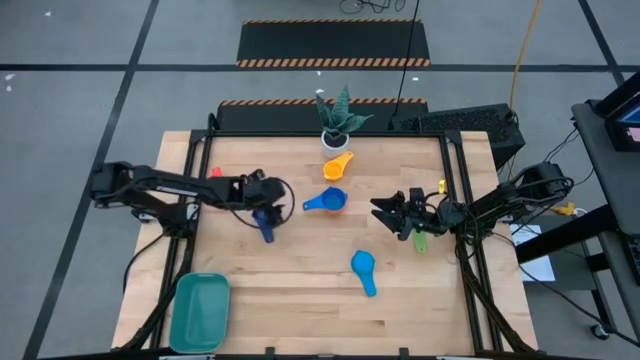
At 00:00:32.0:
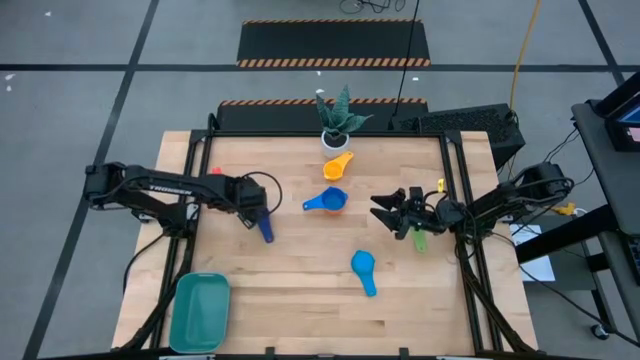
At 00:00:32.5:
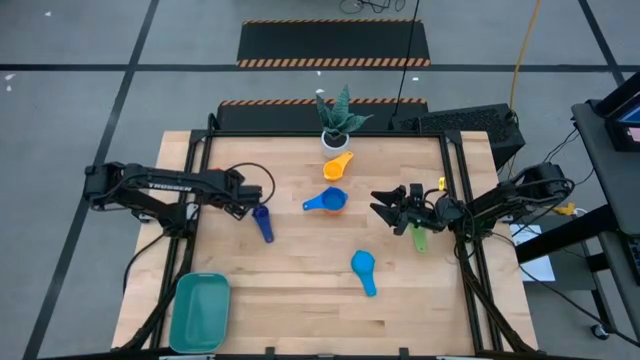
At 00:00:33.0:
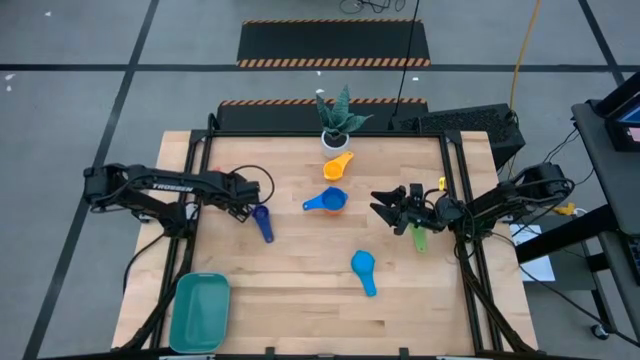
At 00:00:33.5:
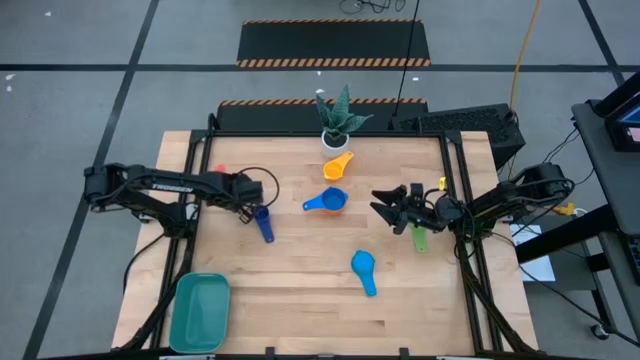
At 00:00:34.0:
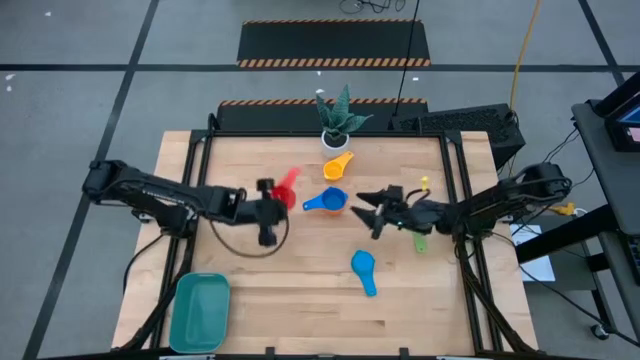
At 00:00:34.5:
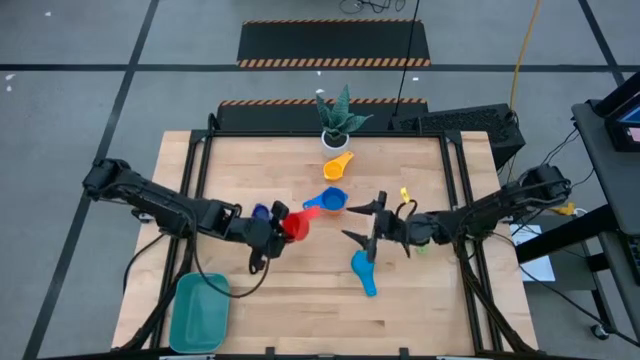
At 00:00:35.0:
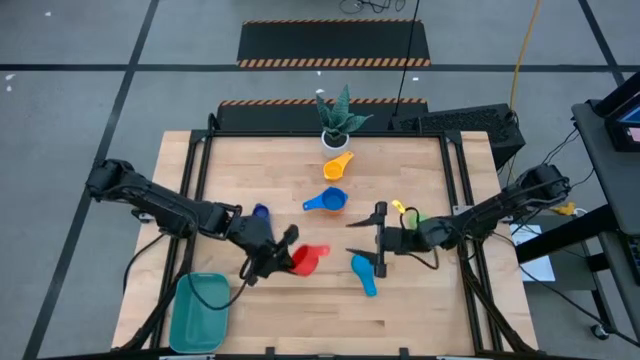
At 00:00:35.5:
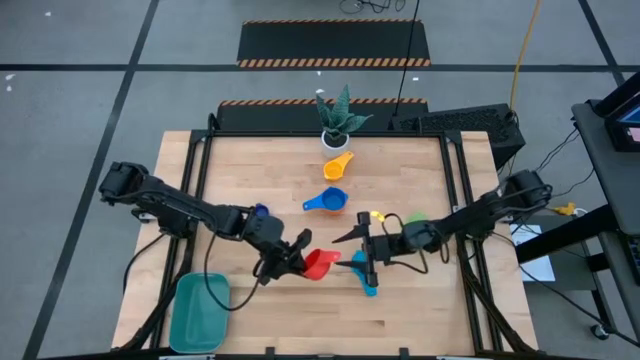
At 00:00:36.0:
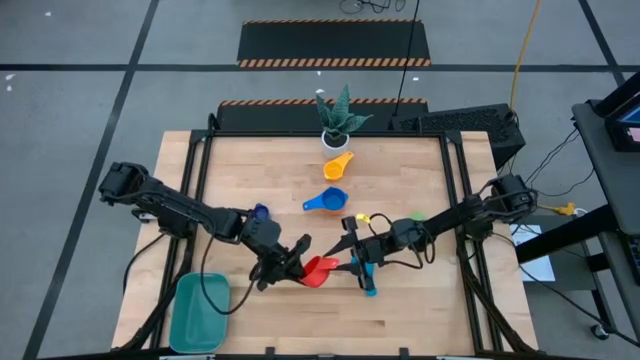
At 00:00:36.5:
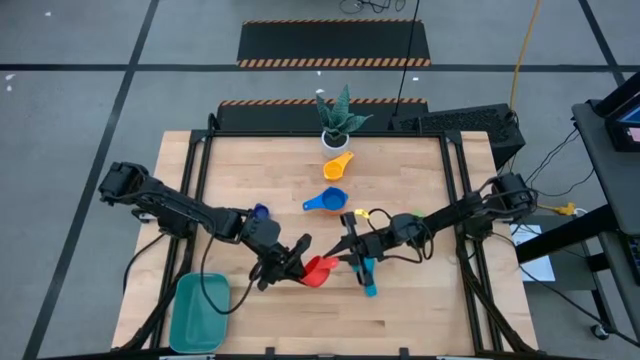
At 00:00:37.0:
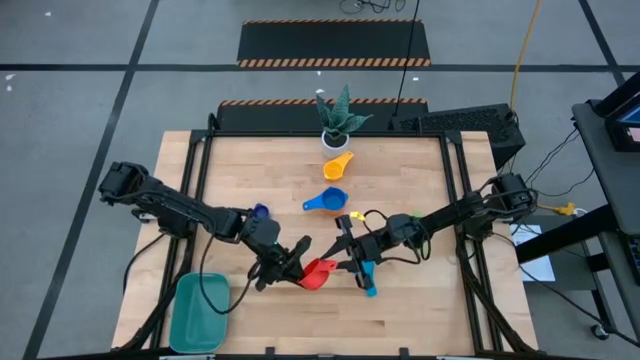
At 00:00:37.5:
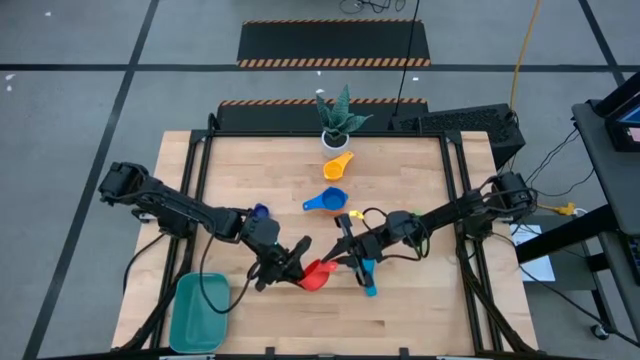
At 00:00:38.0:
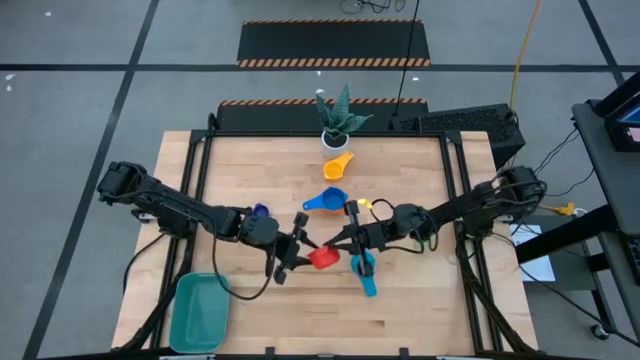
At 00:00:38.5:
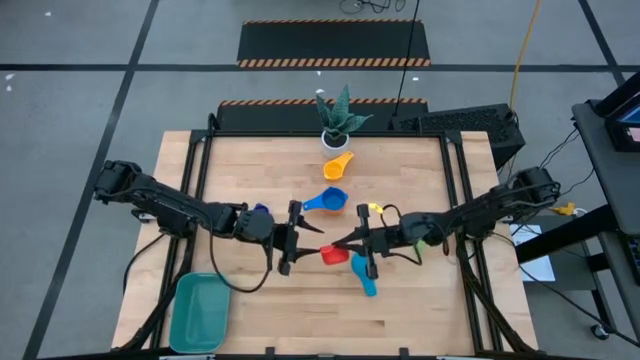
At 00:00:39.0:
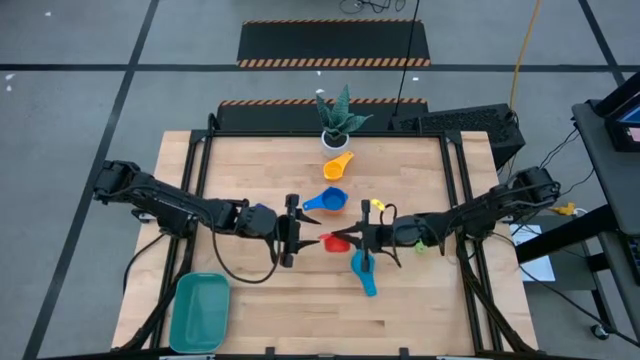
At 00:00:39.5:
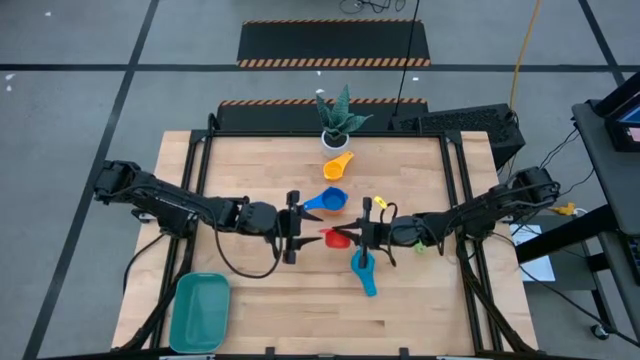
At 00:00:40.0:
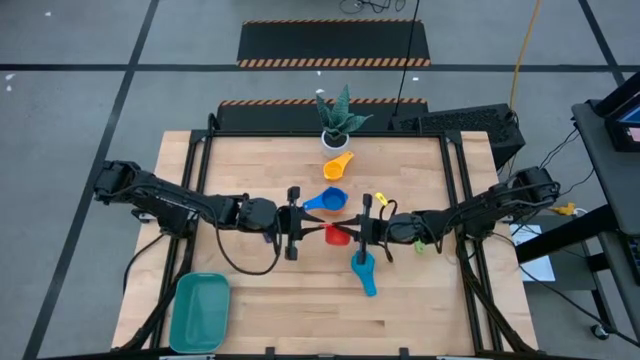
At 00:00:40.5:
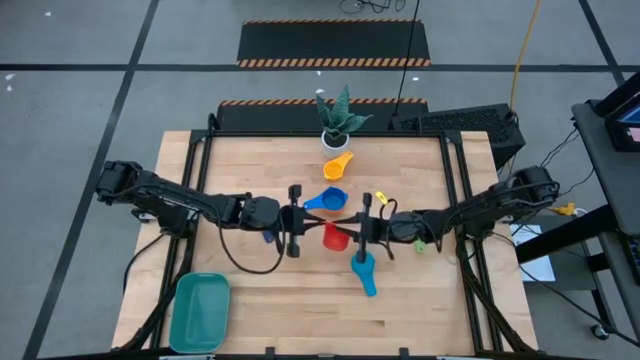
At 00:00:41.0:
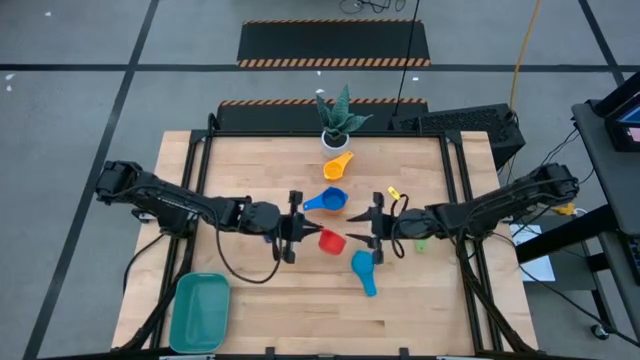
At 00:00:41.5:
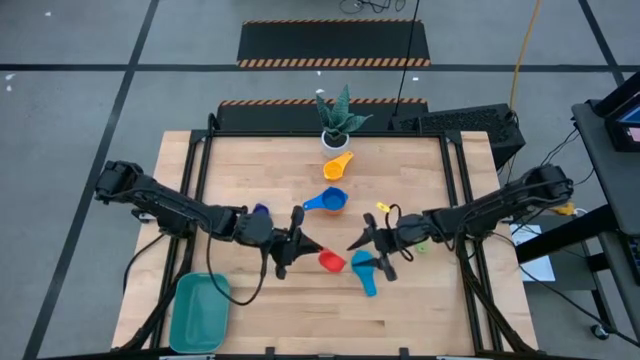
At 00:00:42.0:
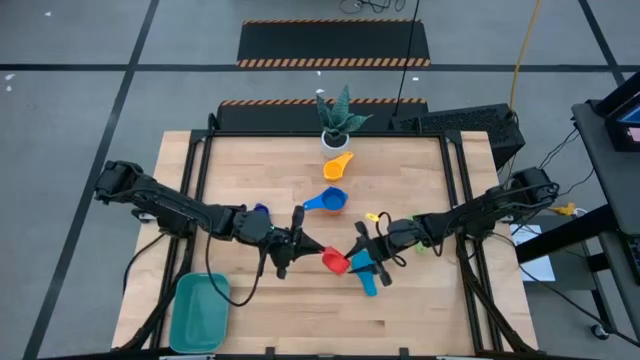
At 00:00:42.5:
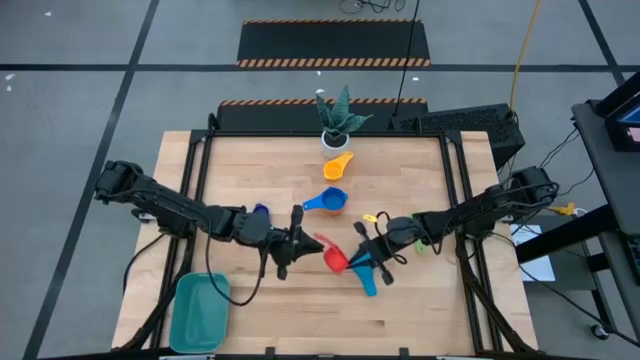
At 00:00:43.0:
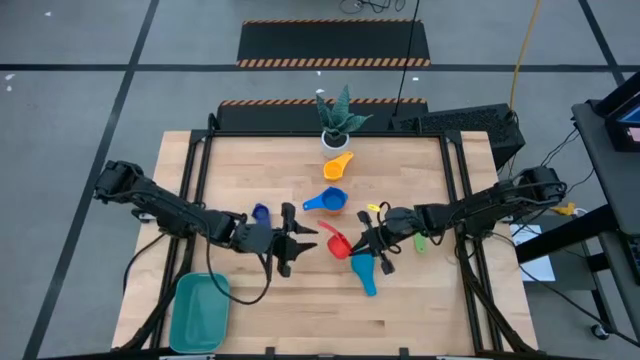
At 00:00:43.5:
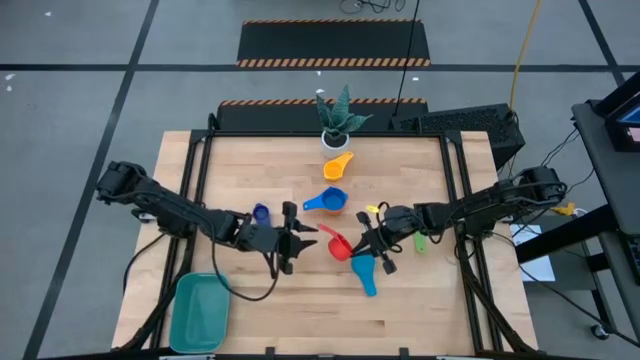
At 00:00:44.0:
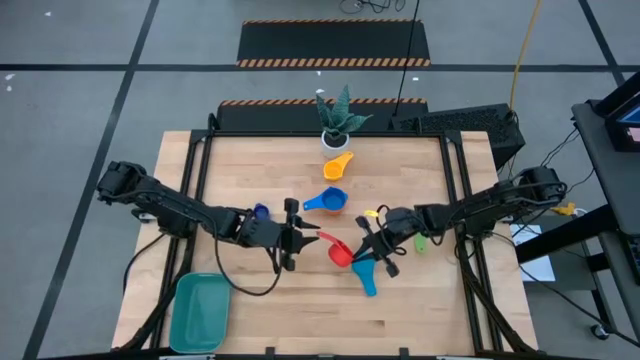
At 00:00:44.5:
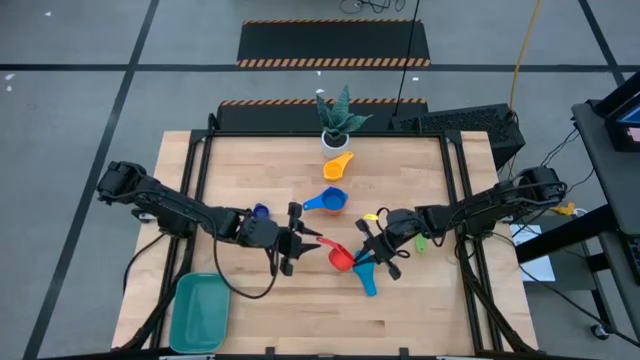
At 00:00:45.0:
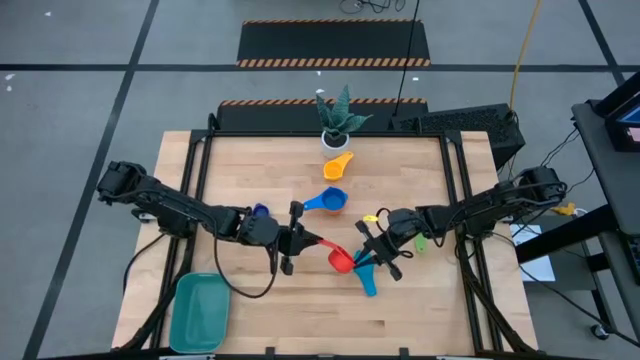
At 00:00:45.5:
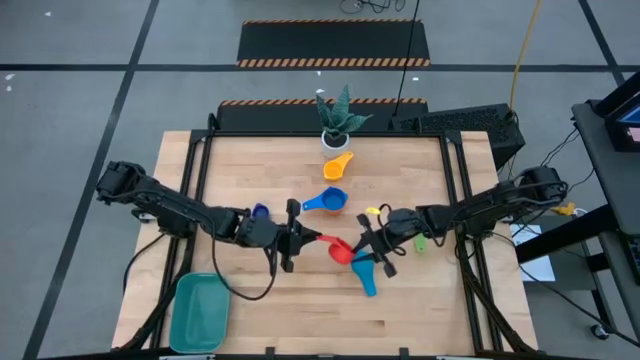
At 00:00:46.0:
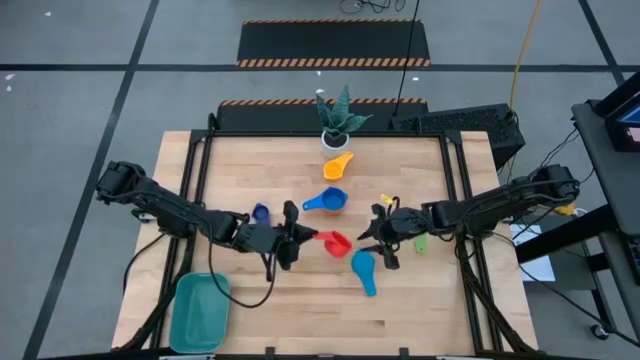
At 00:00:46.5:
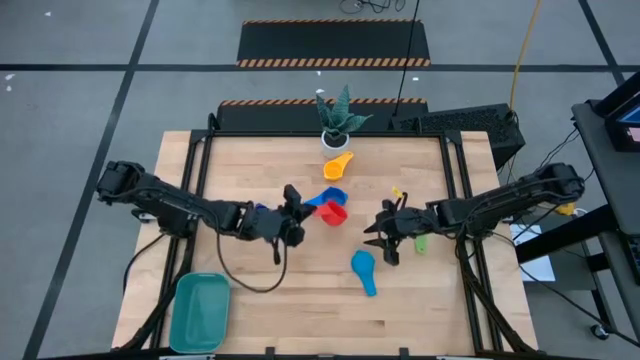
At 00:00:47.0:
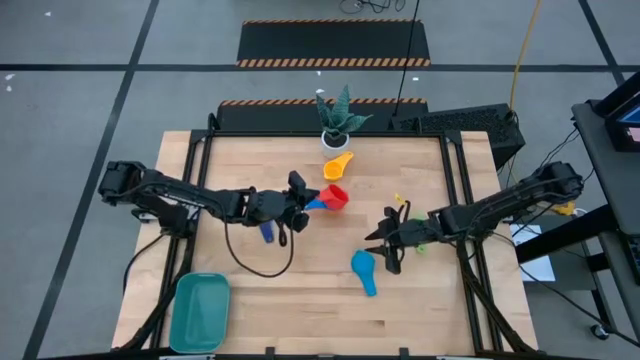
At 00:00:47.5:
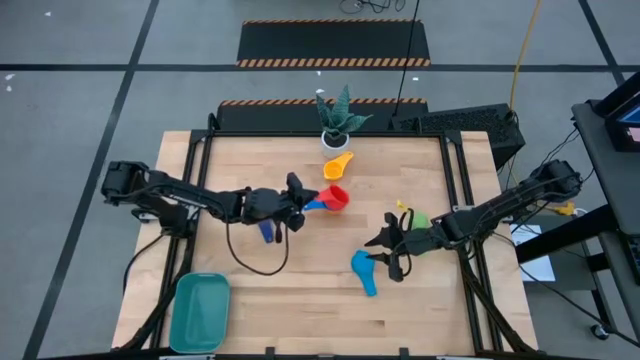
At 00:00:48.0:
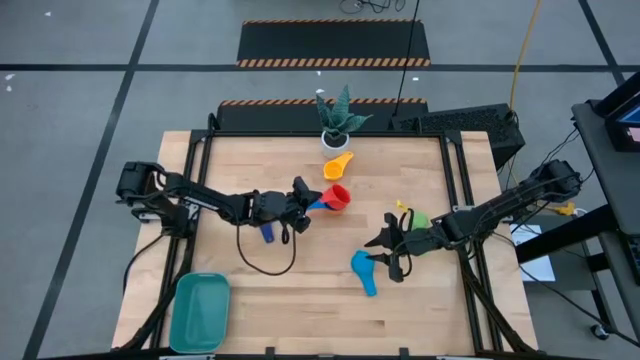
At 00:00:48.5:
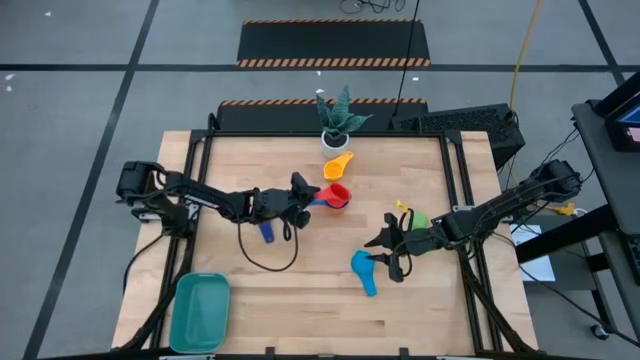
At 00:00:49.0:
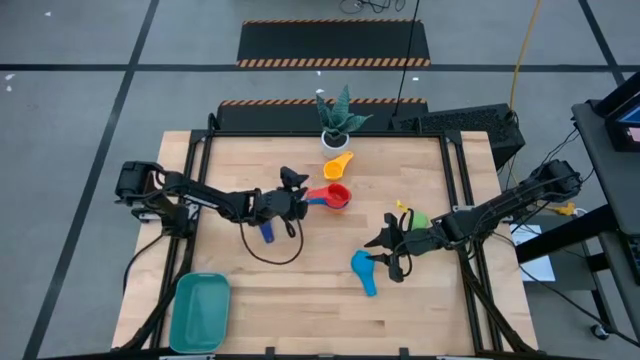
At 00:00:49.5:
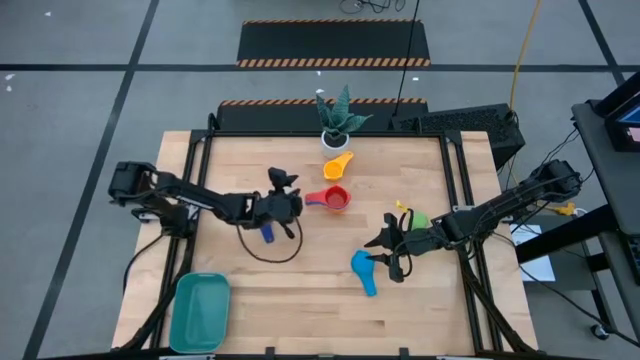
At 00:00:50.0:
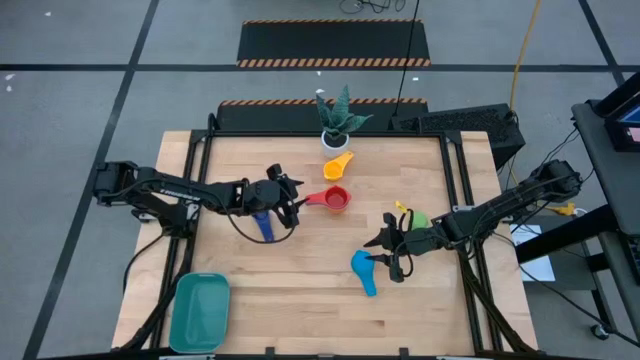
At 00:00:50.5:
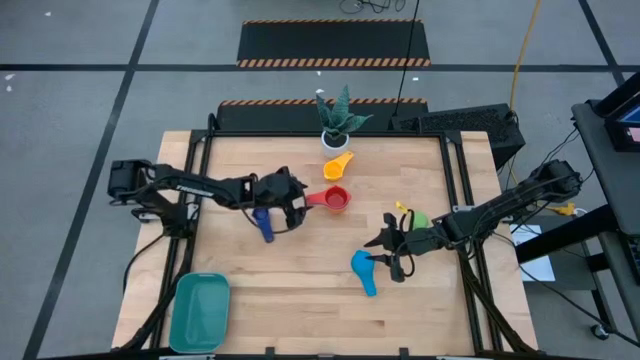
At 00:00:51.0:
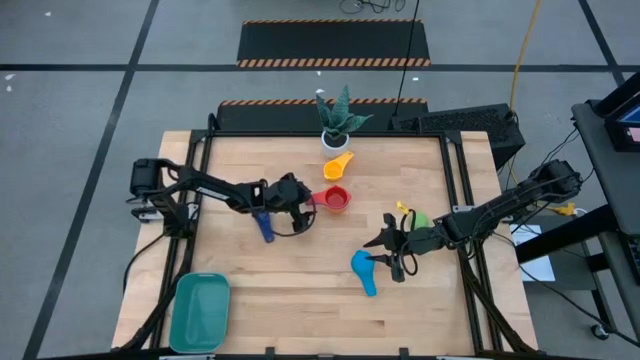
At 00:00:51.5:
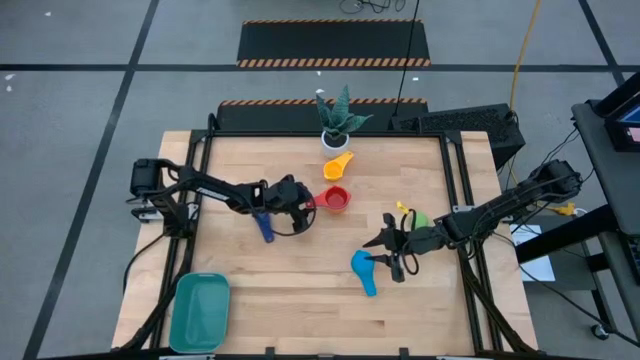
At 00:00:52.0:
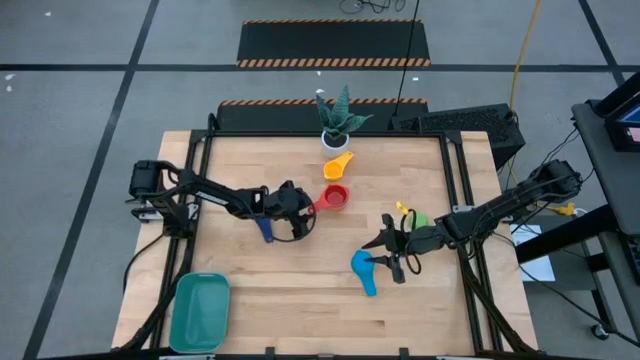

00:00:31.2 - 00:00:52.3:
Task: Nest measuring cups in basket
Stack the red measuring cup on the blue measuring cup

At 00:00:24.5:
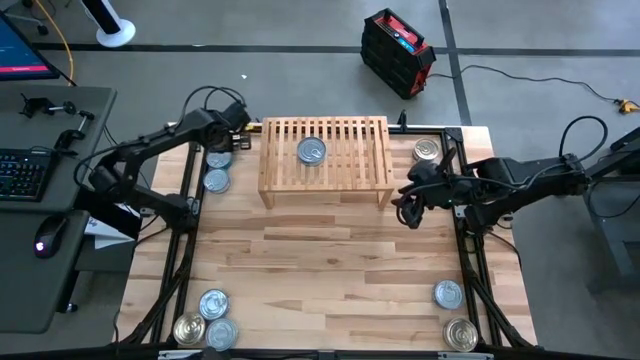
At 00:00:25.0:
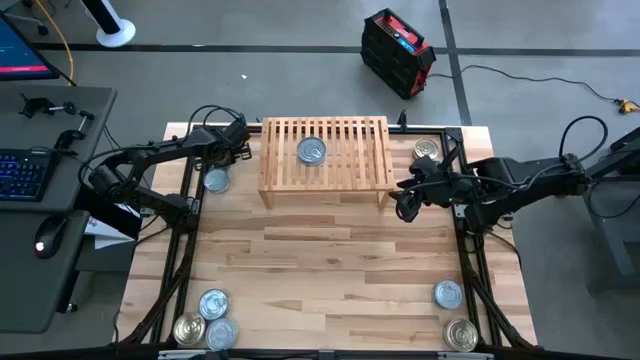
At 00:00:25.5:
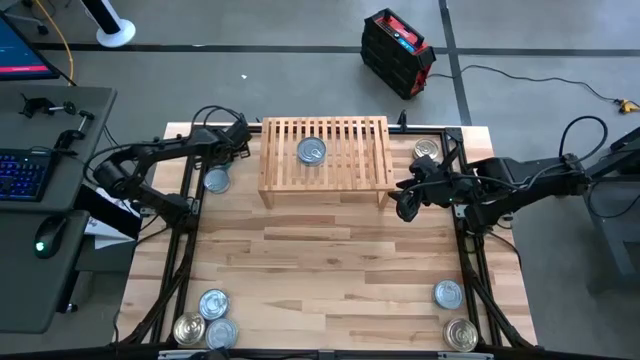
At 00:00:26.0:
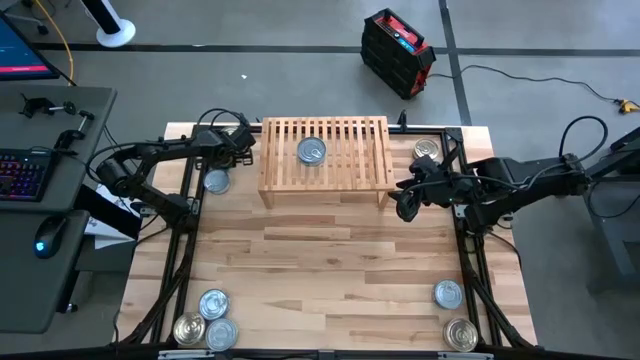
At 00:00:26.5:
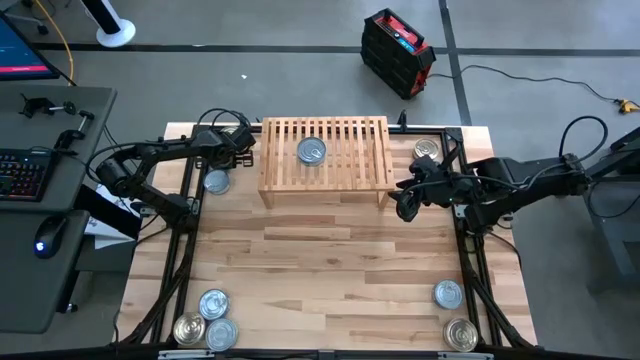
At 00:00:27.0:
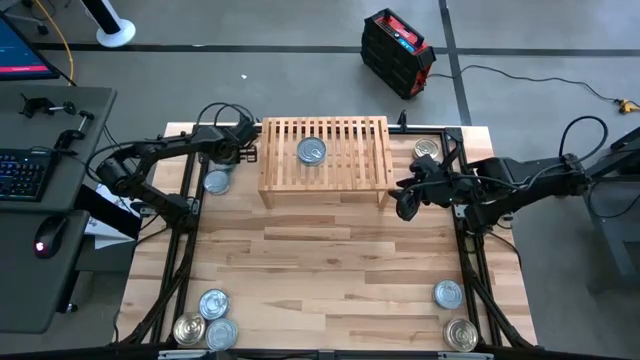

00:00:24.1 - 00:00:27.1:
Task: Stack canned seafood by type on shelf
Adjust the green tuna can on the table
